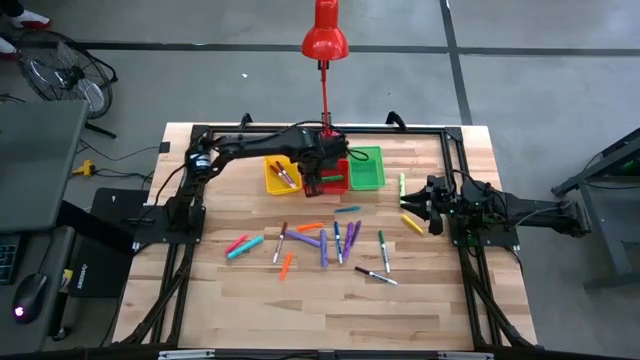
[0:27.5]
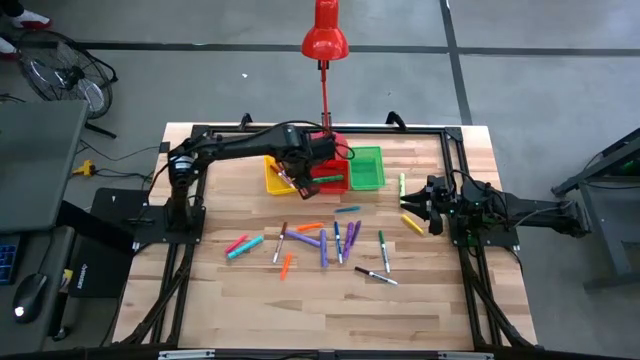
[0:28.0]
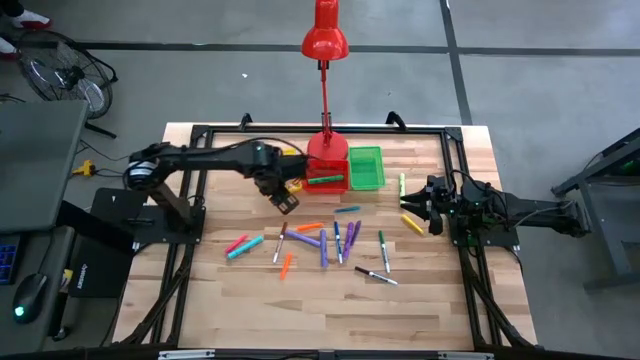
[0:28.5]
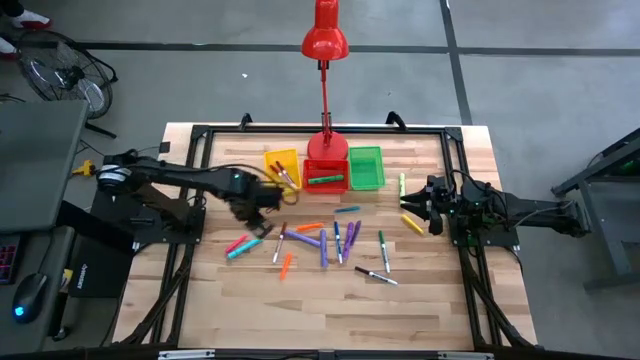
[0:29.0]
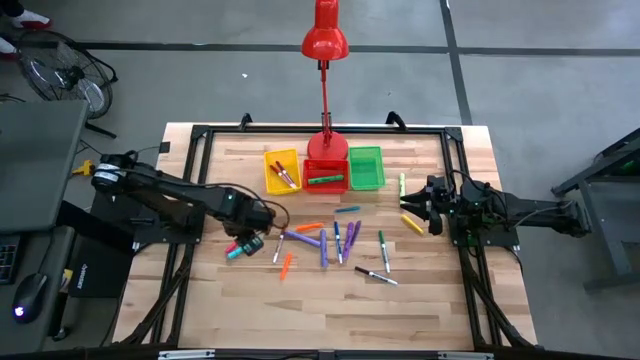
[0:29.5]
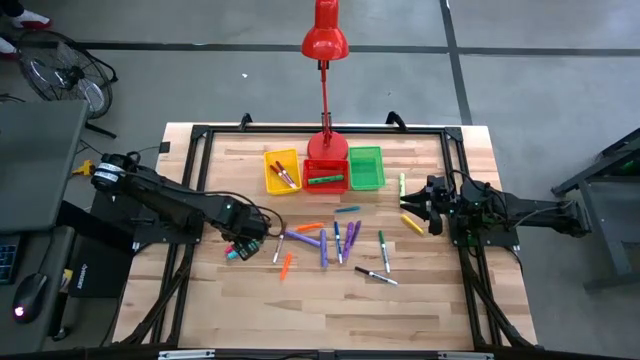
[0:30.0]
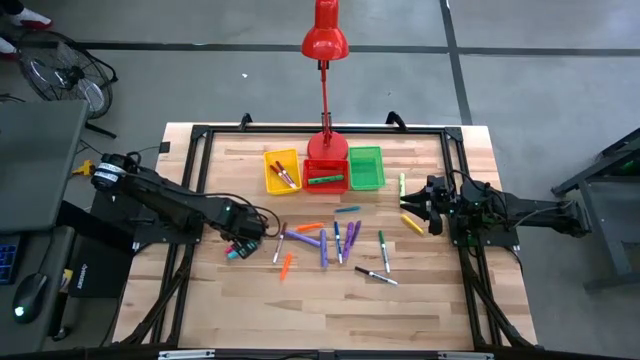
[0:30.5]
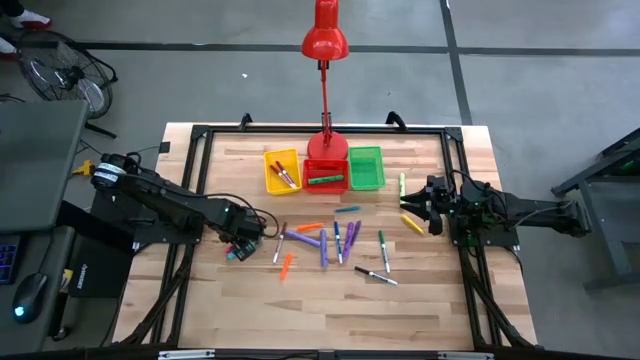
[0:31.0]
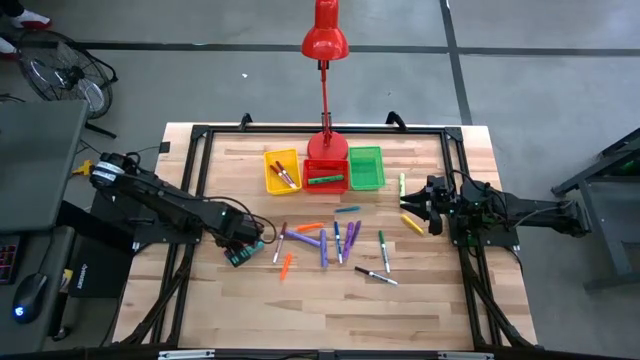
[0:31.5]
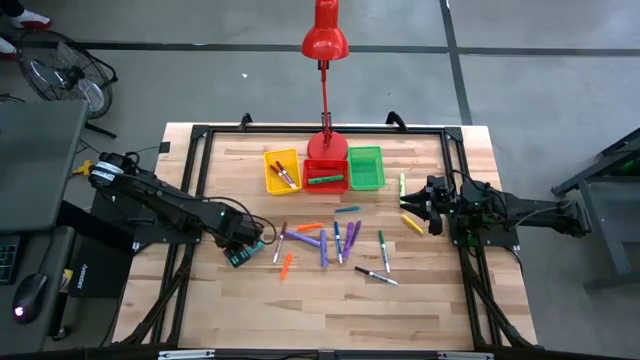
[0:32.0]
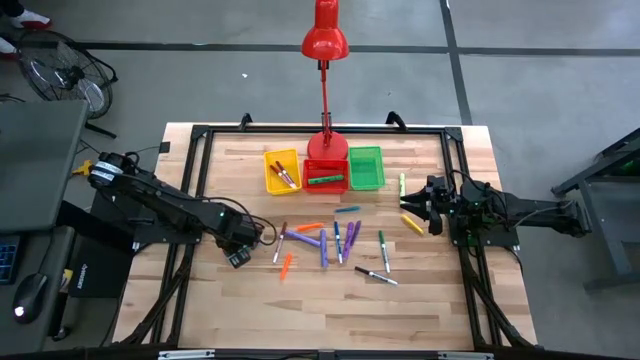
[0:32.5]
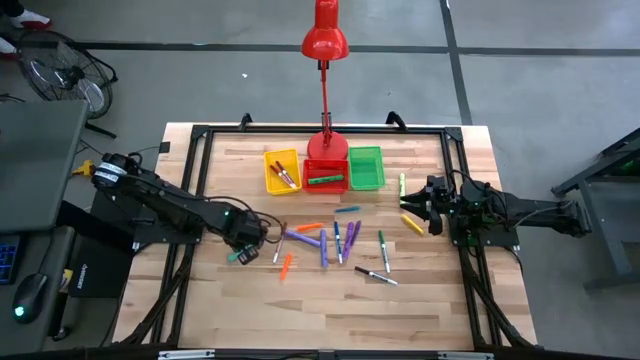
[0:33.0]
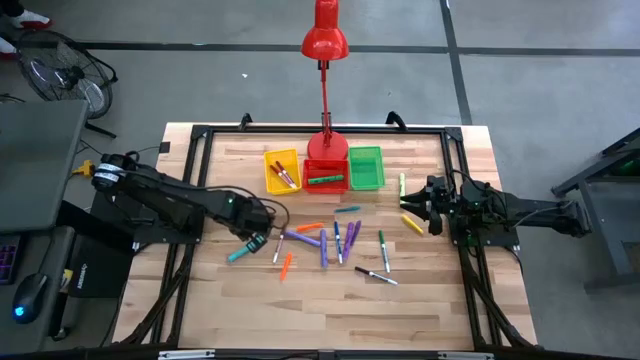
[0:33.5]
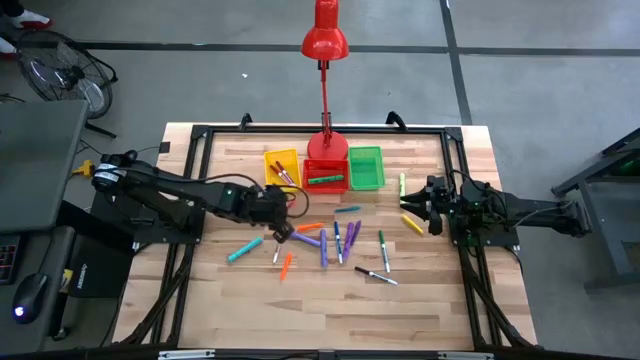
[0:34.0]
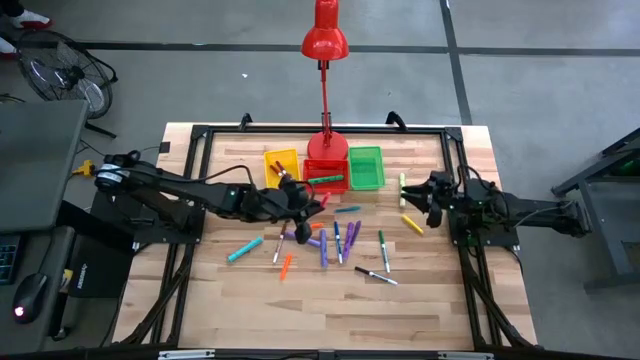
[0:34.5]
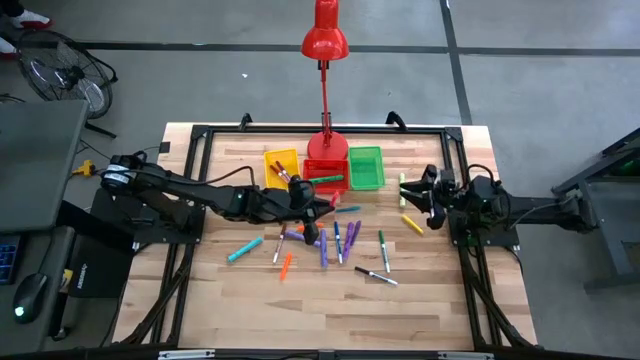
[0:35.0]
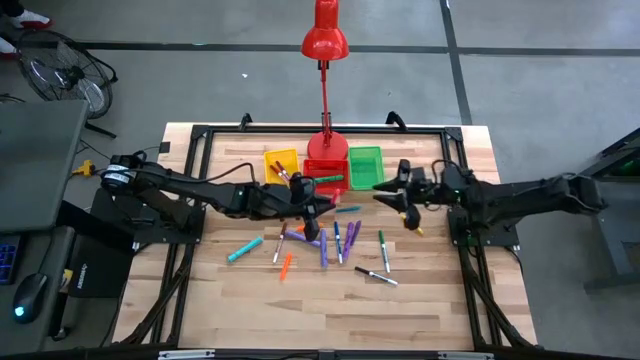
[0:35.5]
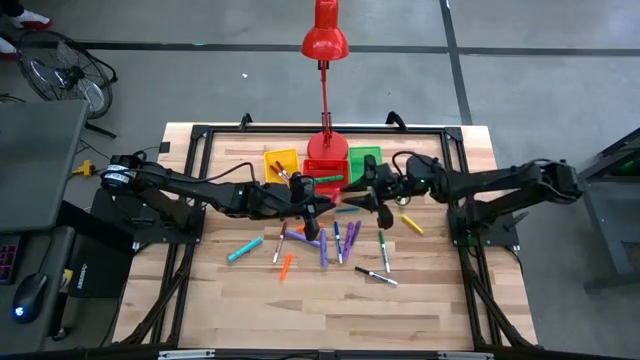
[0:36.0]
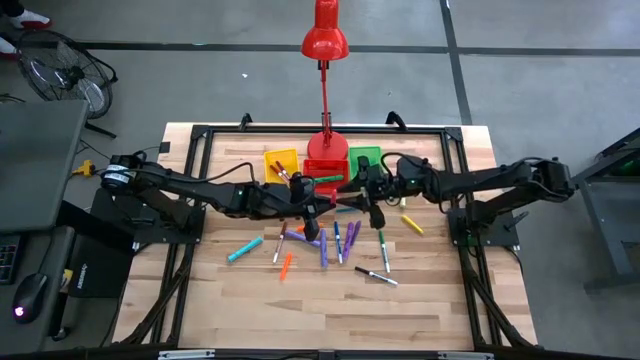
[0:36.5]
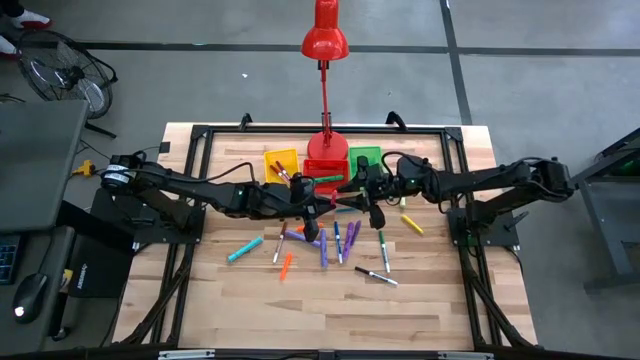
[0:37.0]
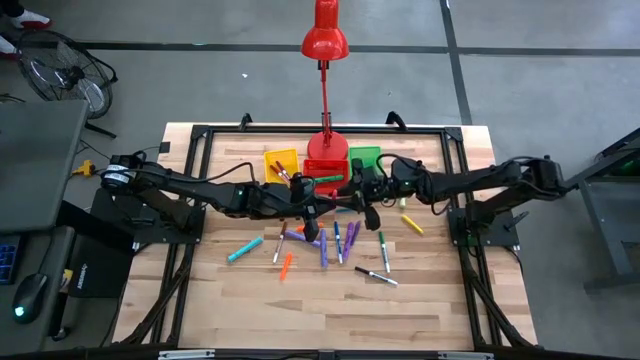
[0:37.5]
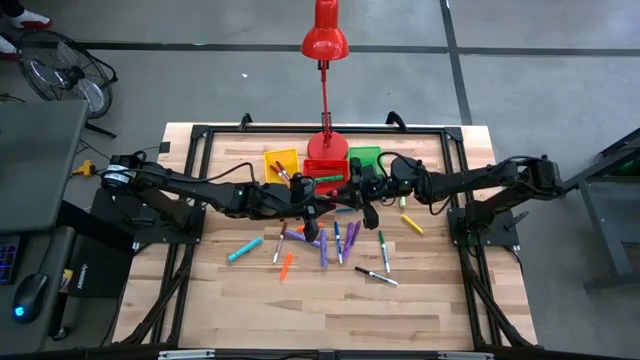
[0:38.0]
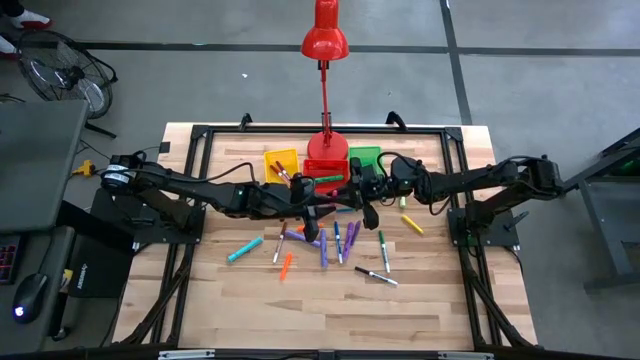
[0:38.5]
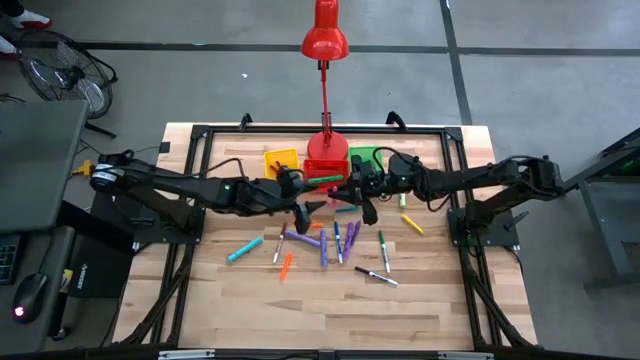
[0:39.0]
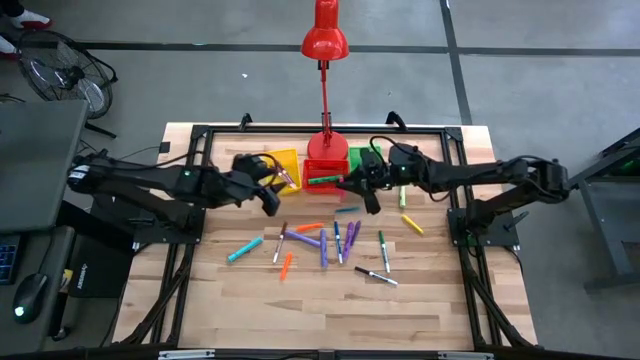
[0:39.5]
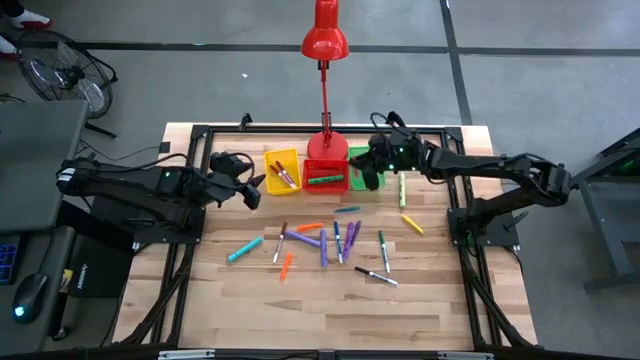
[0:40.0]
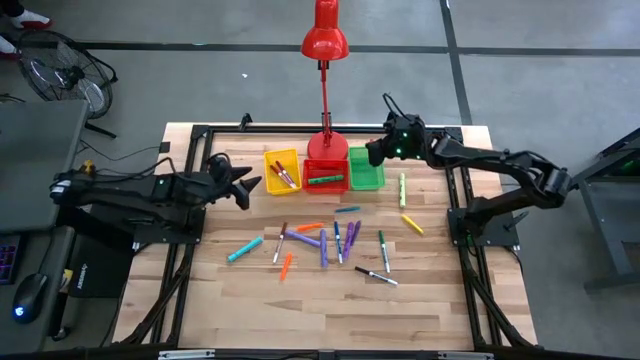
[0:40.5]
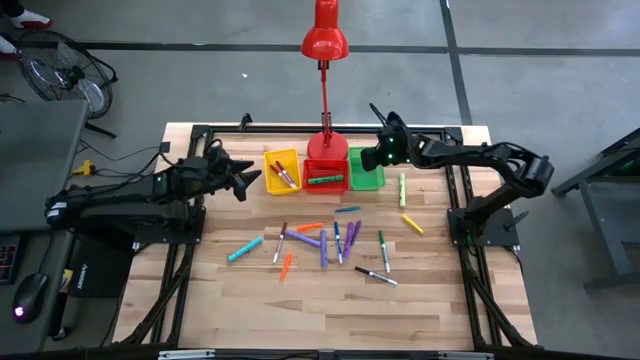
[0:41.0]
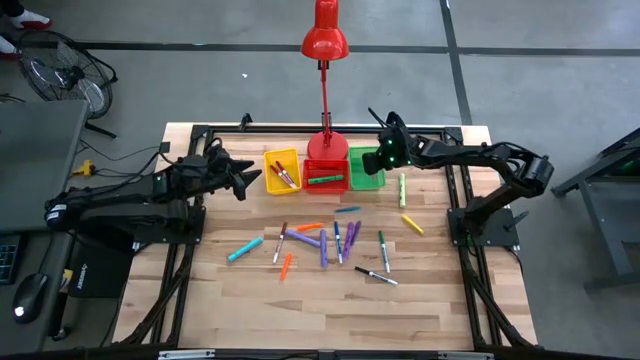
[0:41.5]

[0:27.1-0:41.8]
Task: Pick & Place Markers
Put the pink pen into the green bin

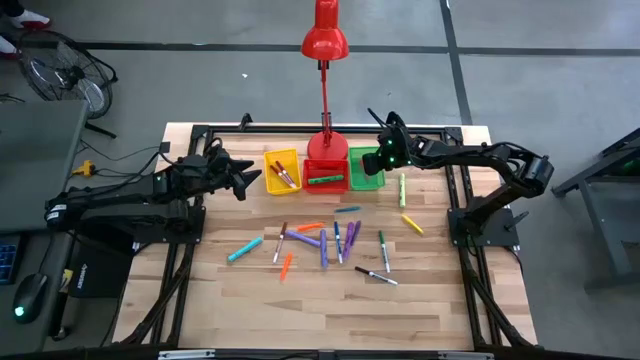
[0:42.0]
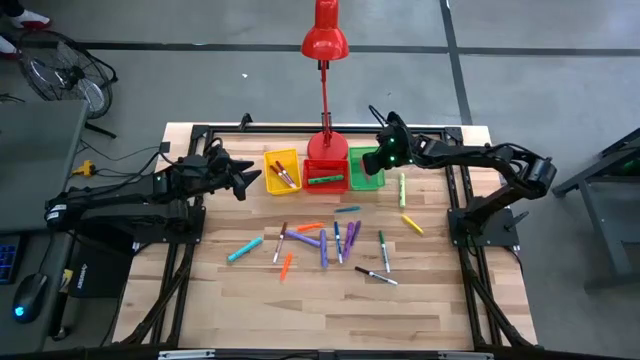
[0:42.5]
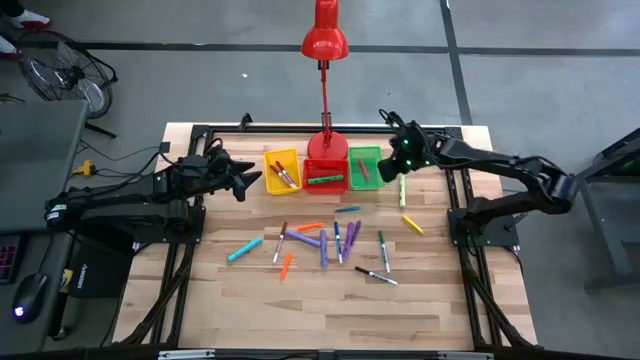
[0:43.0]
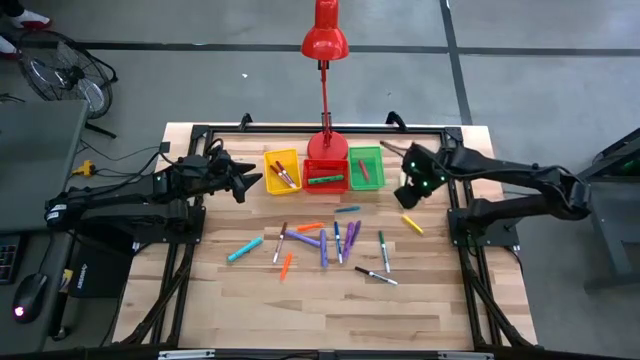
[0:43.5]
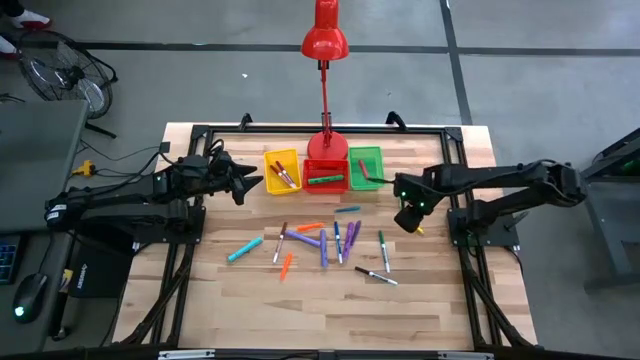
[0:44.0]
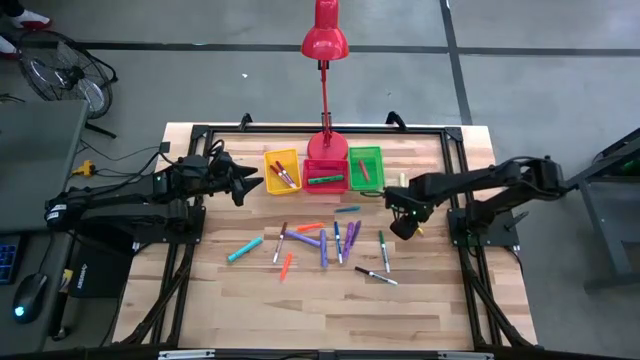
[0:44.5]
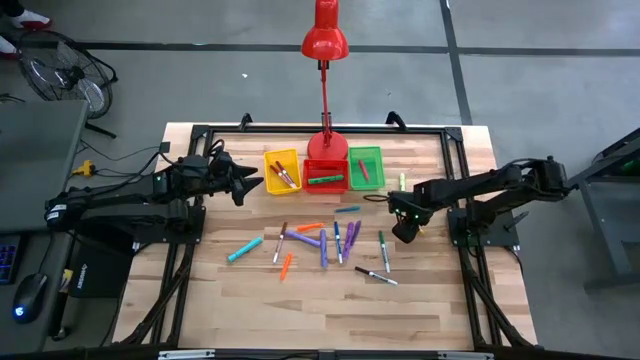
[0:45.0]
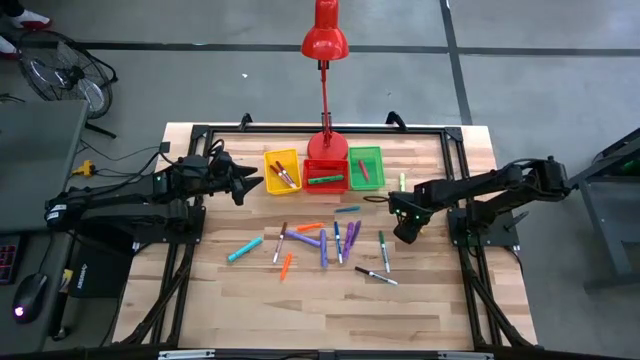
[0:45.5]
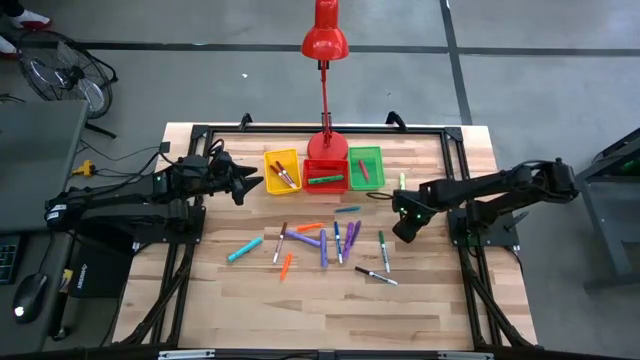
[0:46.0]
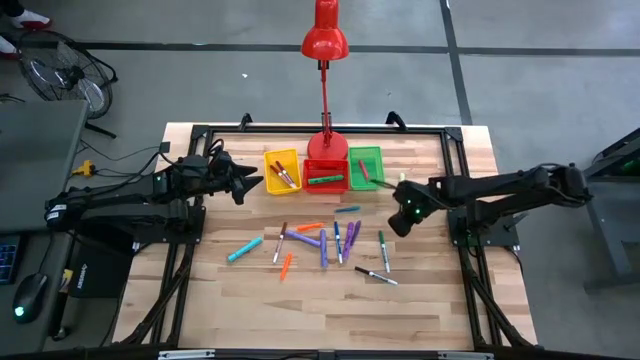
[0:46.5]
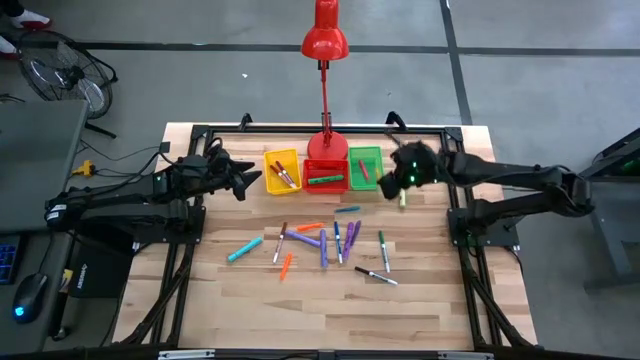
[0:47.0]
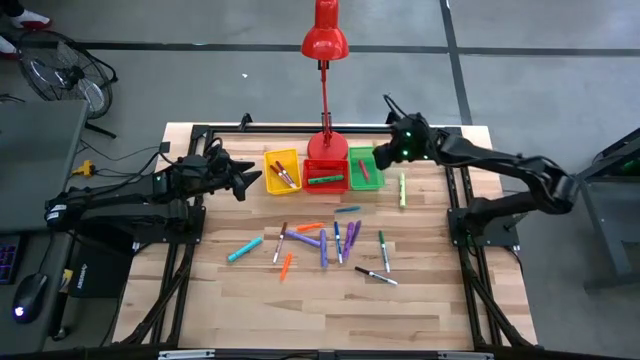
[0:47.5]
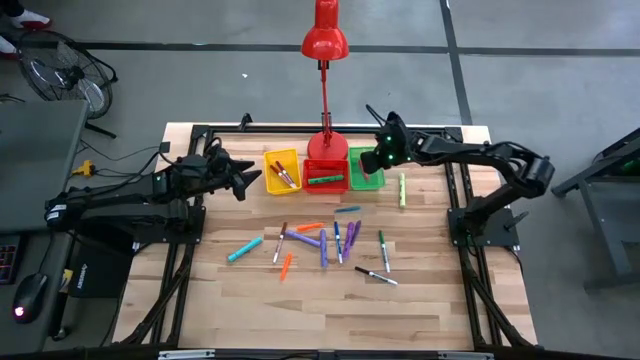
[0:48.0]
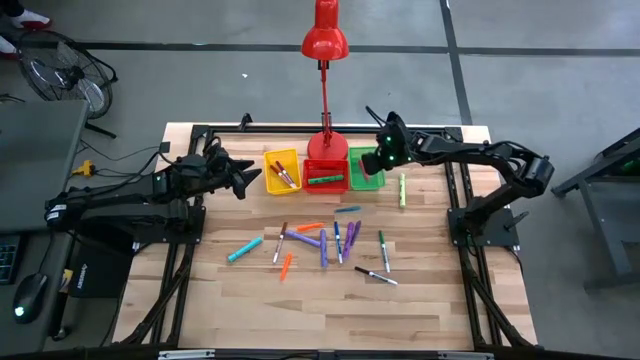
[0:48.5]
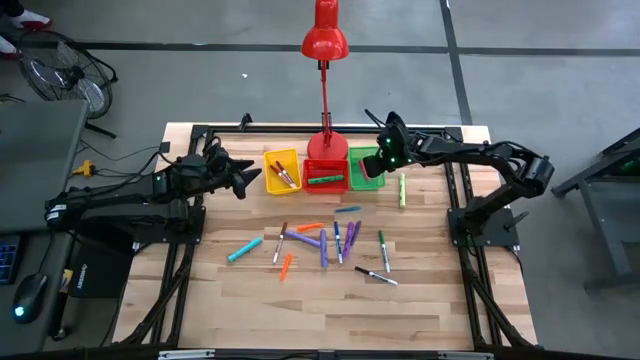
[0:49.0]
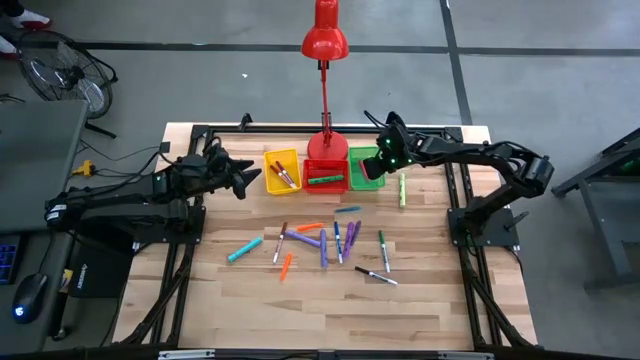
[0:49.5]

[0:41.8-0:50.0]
Put the yellow pen into the green bin
